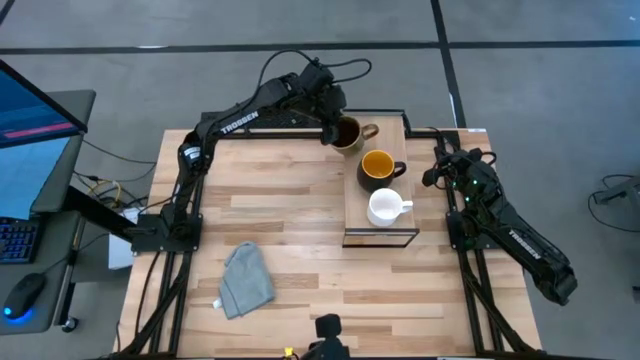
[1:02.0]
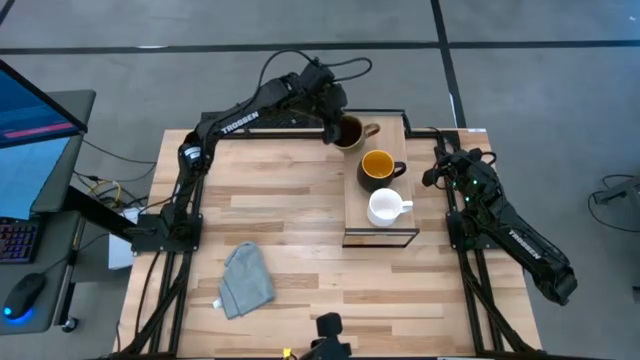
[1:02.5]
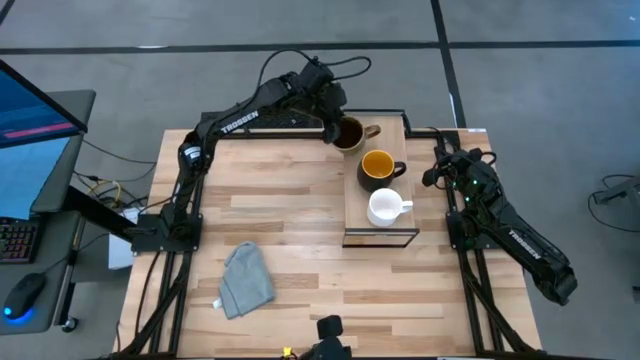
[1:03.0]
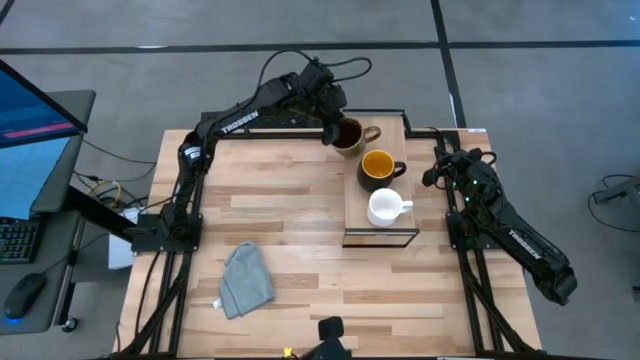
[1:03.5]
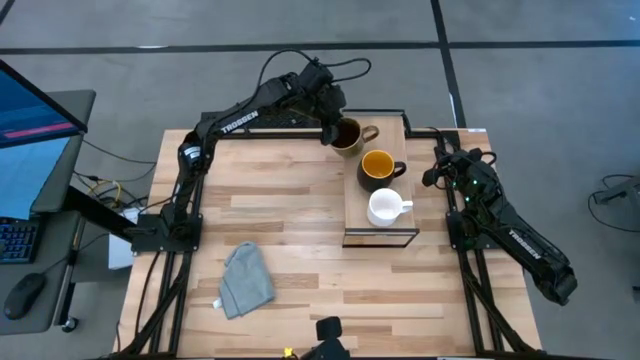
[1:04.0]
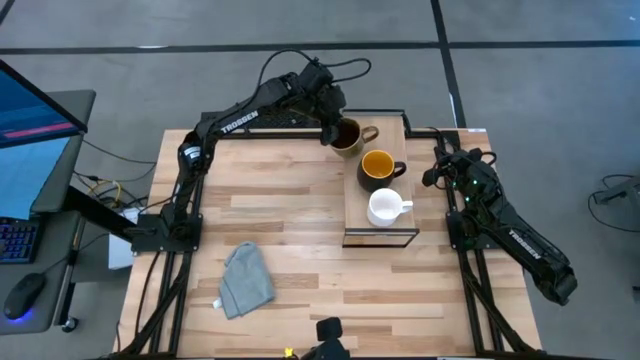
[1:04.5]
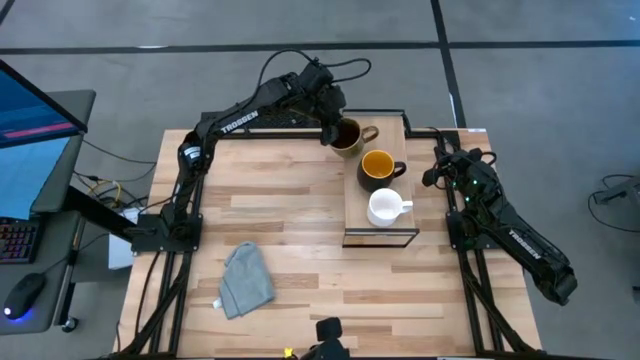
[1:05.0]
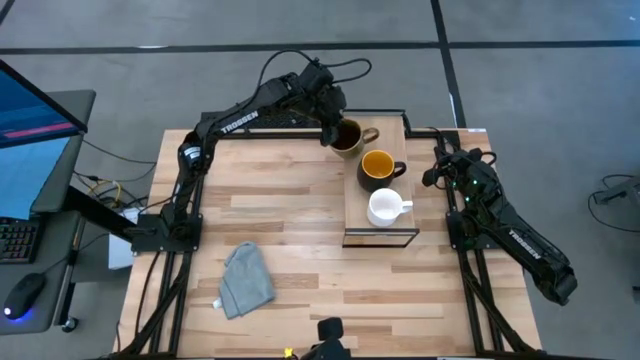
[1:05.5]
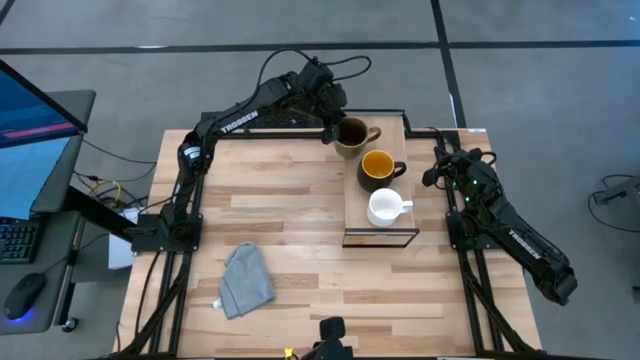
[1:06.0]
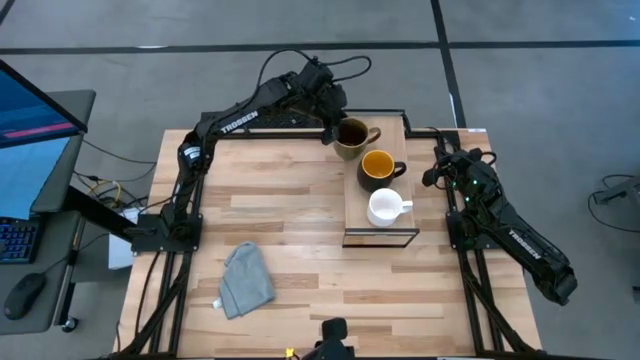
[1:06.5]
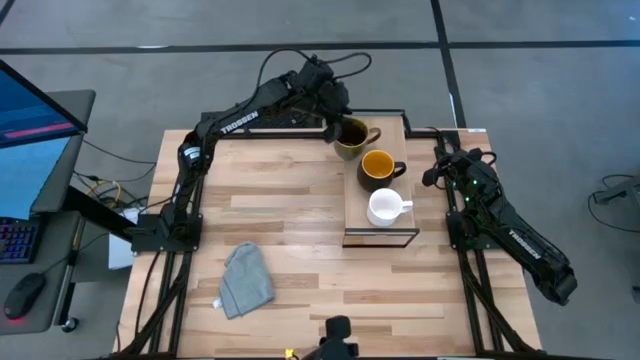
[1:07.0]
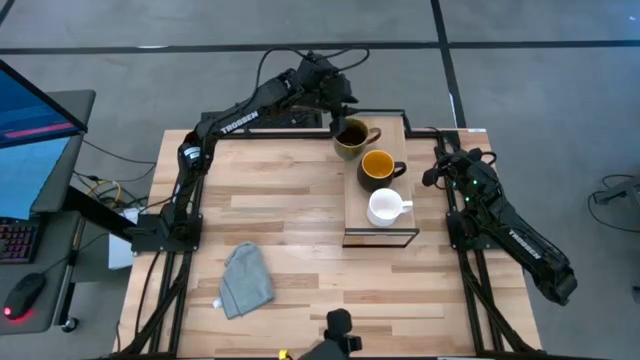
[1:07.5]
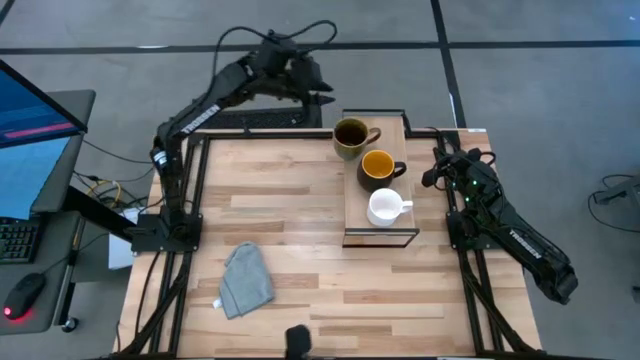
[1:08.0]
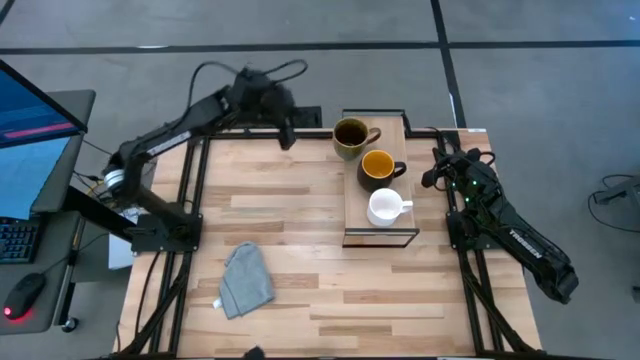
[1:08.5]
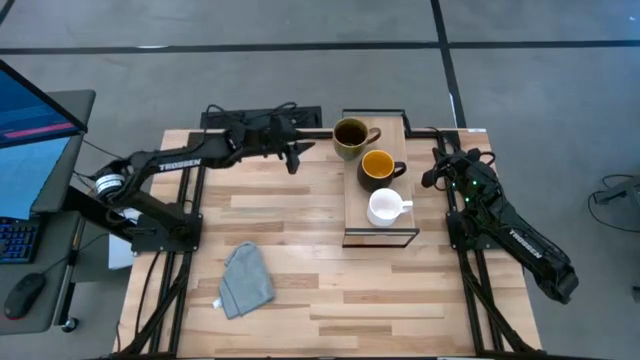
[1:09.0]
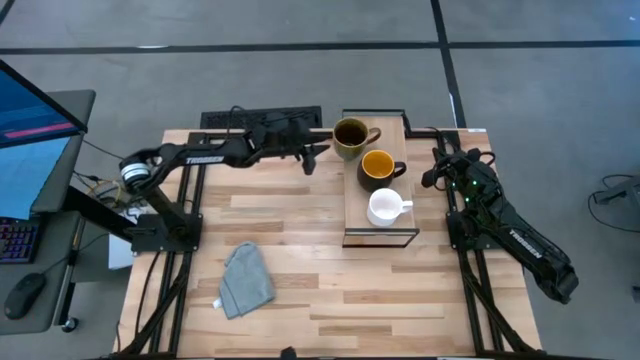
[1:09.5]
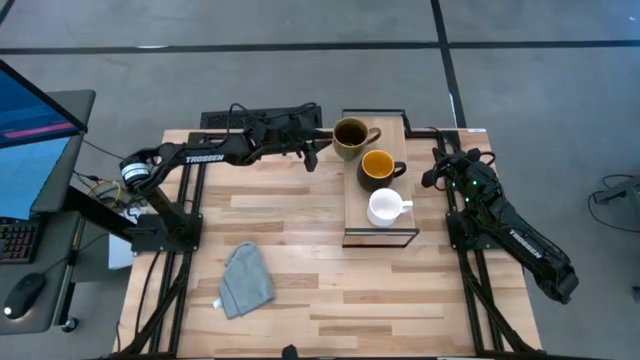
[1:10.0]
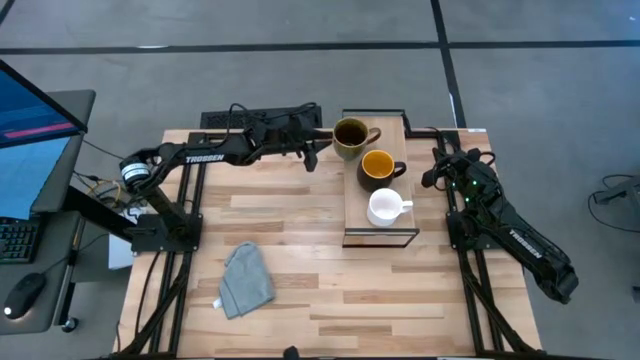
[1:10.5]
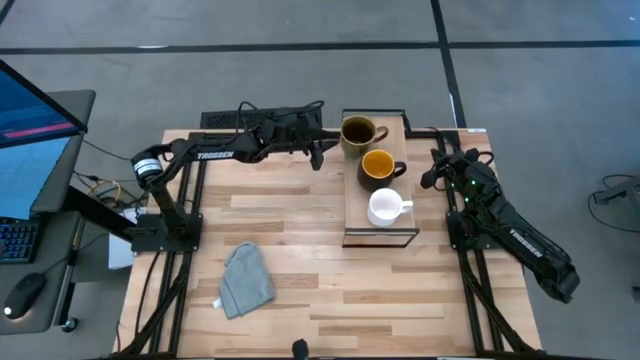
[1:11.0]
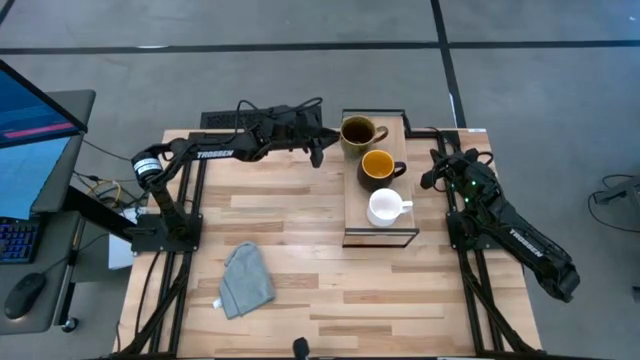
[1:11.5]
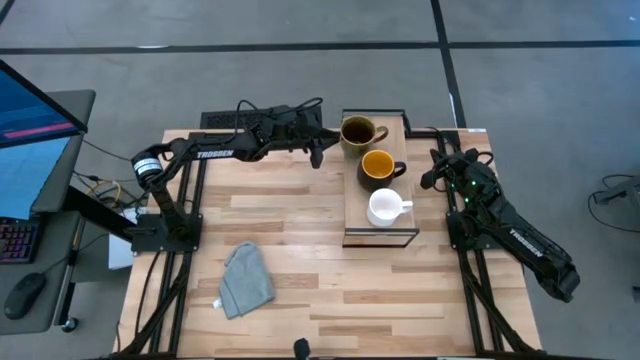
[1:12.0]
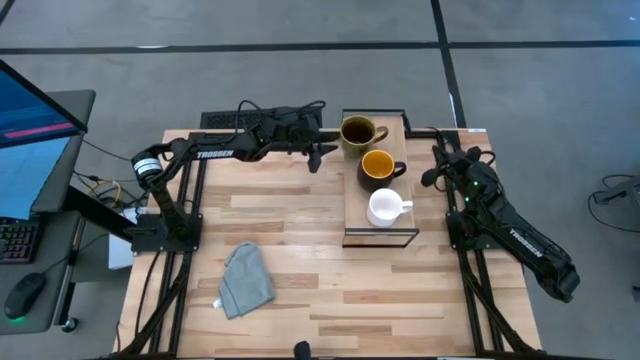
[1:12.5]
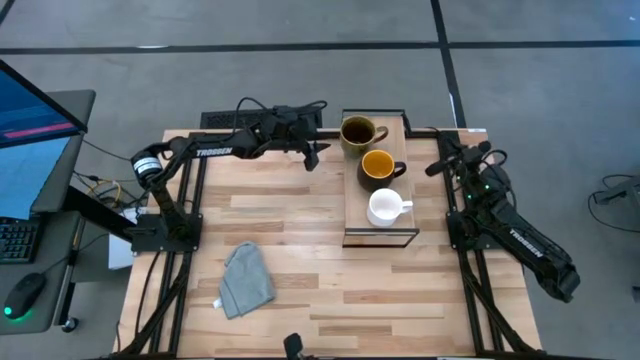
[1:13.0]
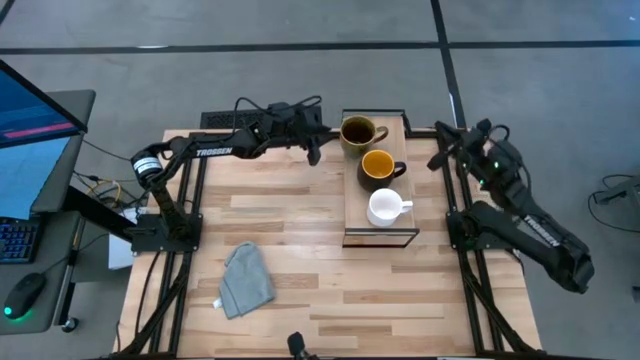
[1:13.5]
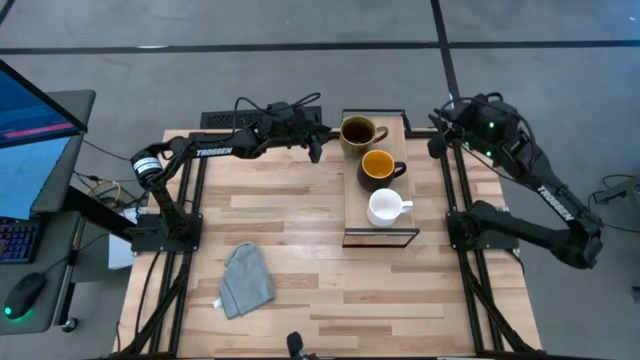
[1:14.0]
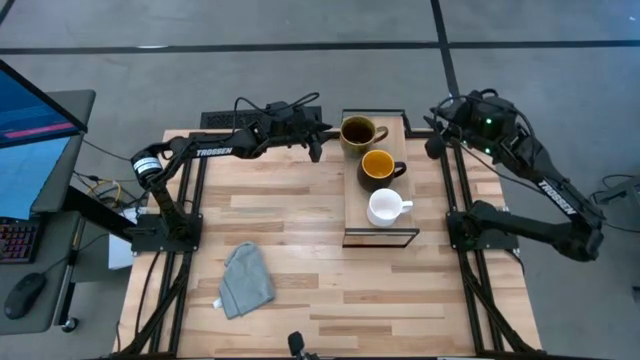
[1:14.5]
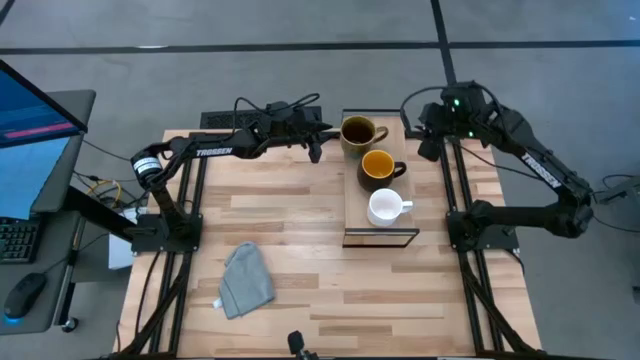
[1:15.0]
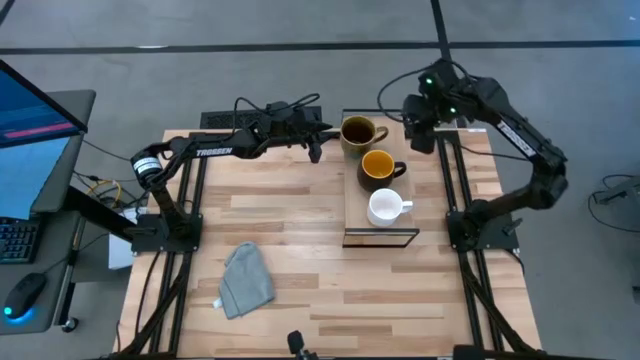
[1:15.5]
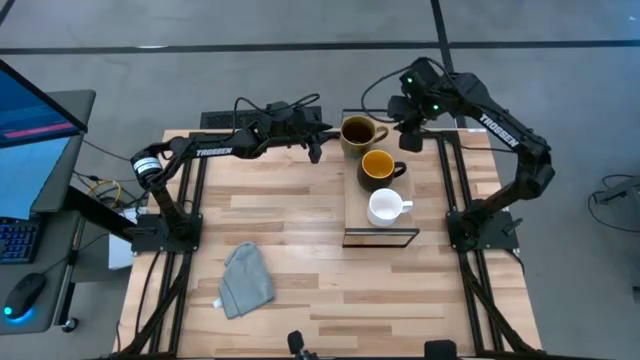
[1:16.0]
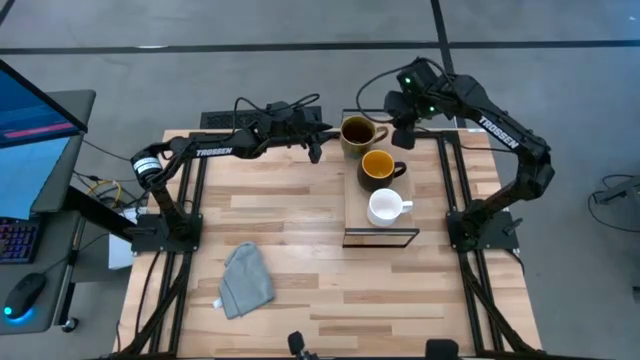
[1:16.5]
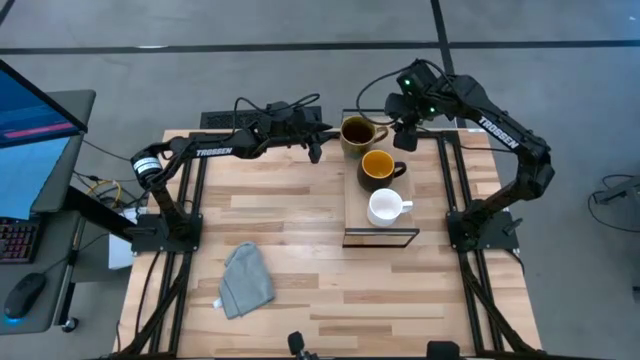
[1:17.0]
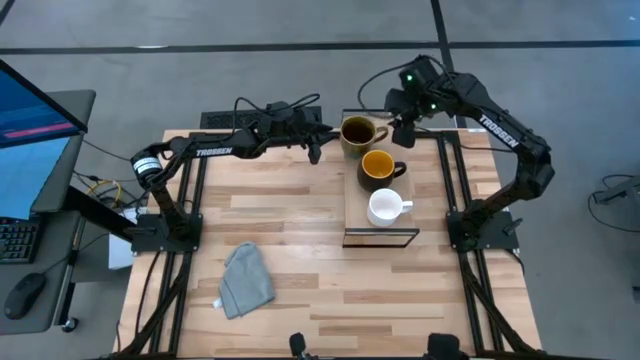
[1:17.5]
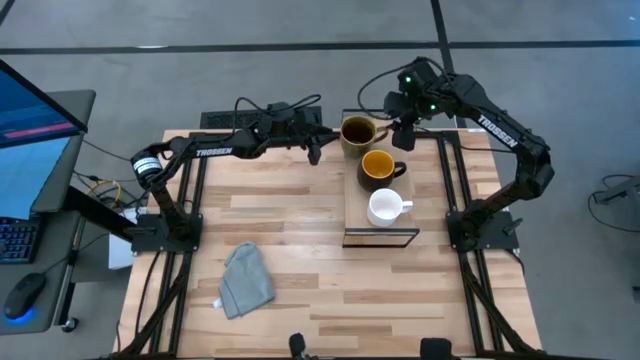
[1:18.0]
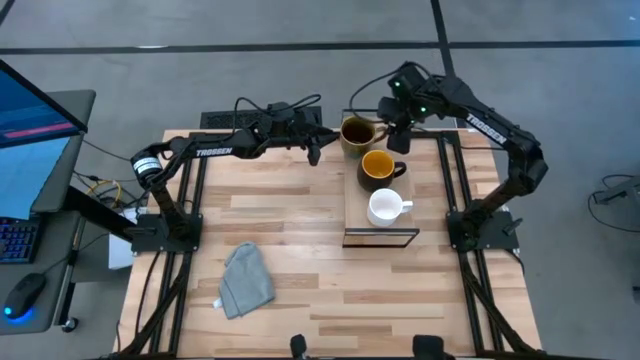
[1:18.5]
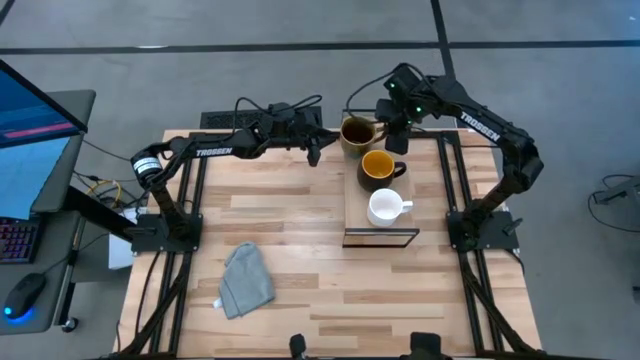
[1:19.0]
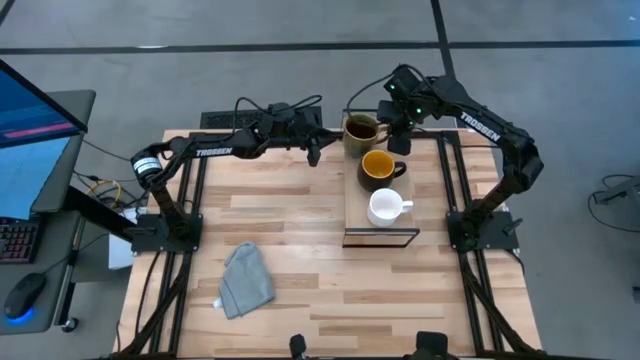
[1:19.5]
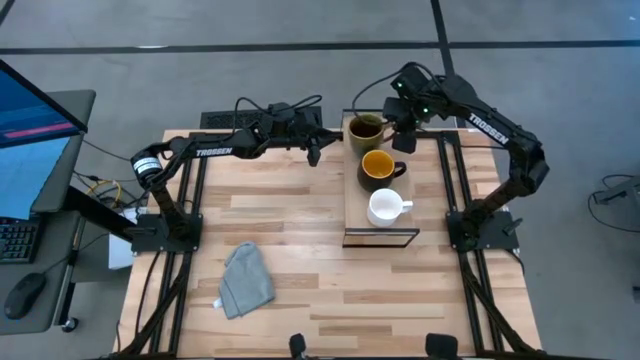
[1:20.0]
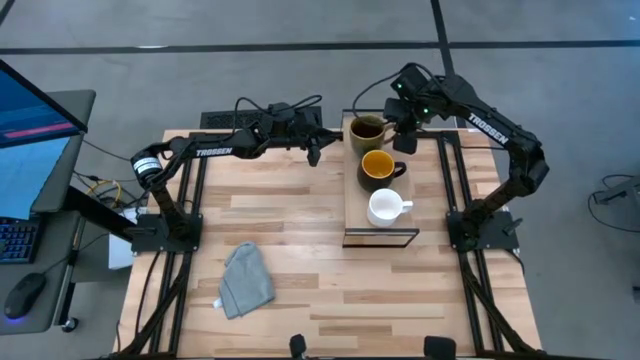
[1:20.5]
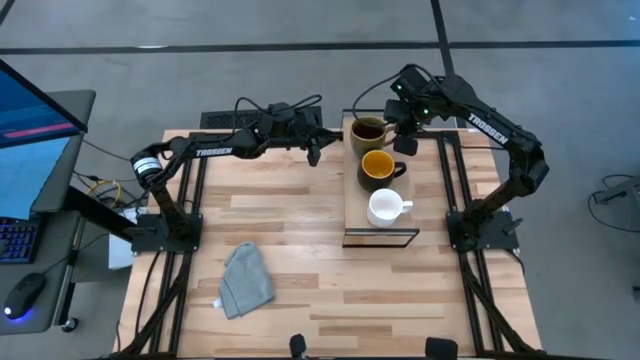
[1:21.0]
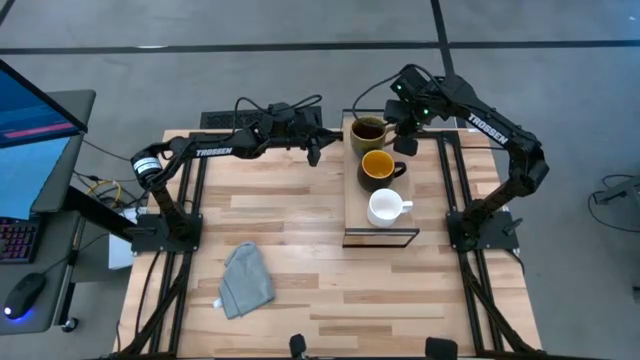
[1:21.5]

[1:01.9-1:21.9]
Task: Stack small to large cups/mugs on shelf
Put the brown mug on the shelf
